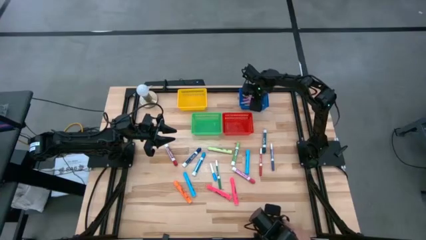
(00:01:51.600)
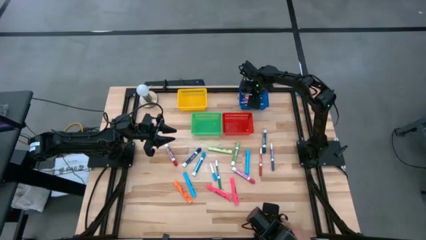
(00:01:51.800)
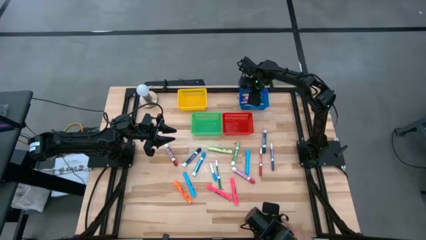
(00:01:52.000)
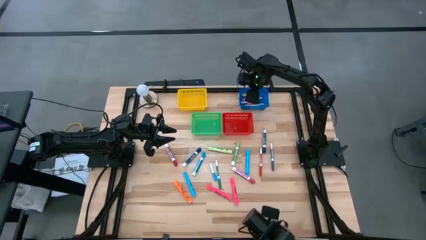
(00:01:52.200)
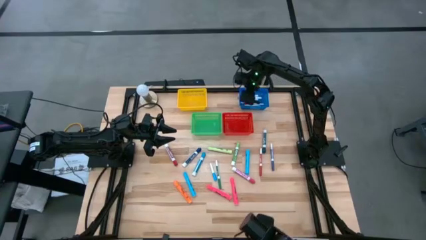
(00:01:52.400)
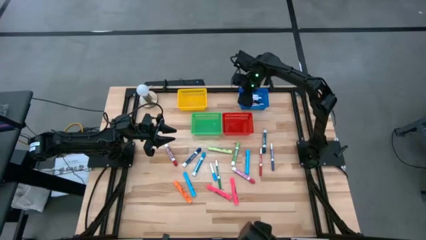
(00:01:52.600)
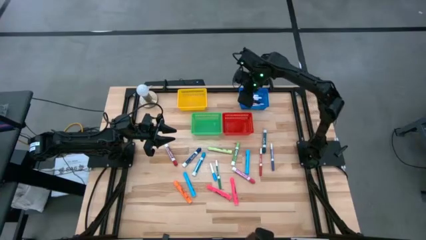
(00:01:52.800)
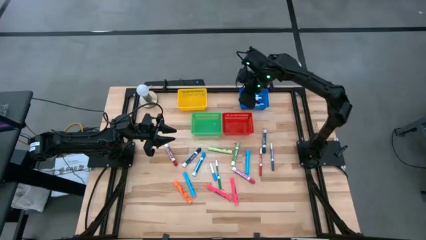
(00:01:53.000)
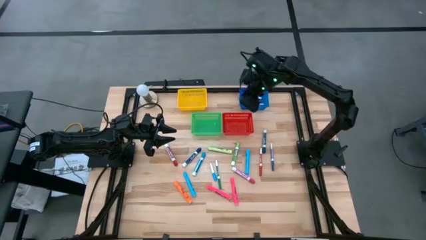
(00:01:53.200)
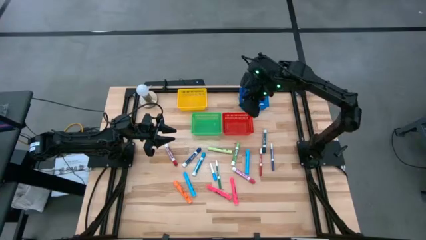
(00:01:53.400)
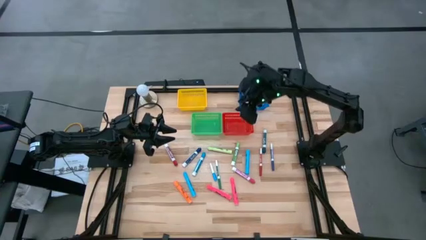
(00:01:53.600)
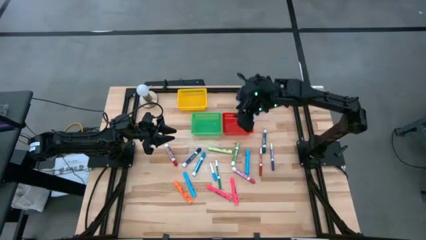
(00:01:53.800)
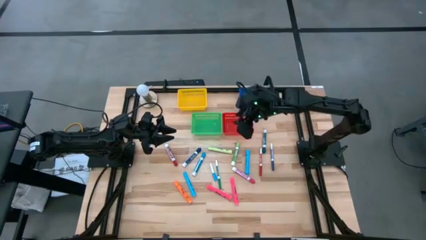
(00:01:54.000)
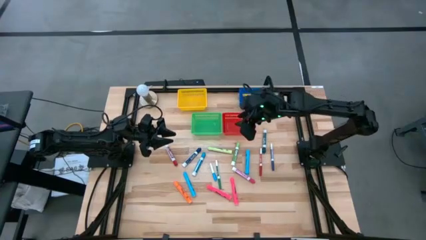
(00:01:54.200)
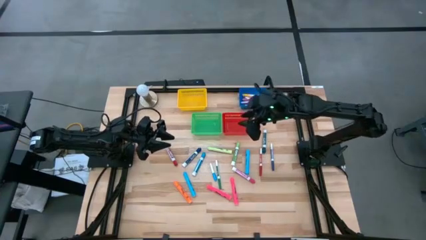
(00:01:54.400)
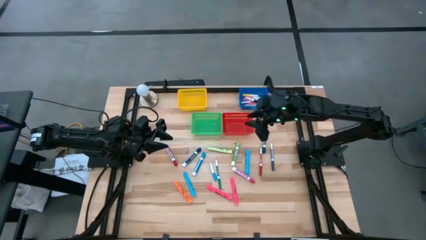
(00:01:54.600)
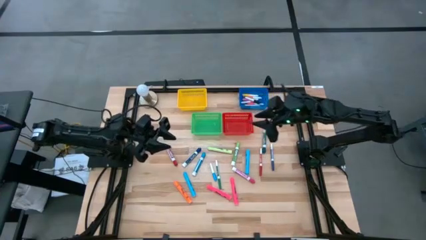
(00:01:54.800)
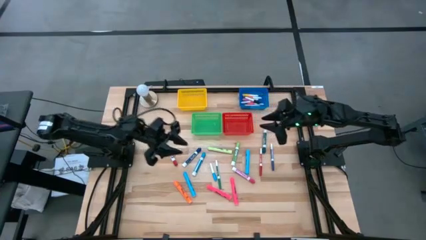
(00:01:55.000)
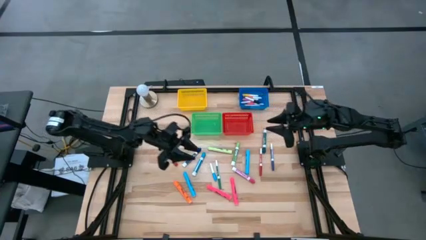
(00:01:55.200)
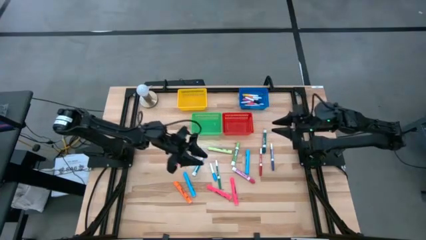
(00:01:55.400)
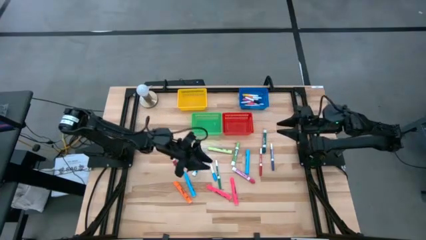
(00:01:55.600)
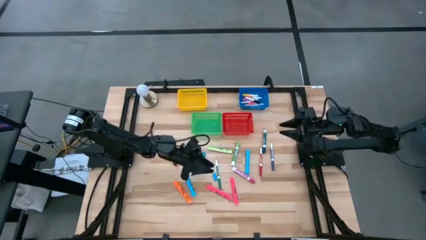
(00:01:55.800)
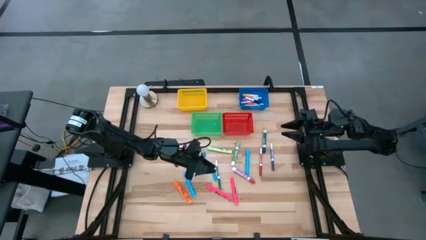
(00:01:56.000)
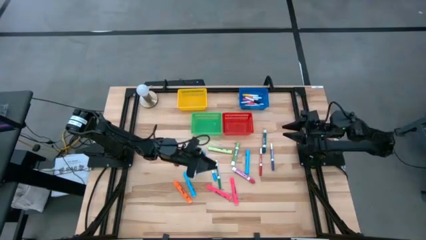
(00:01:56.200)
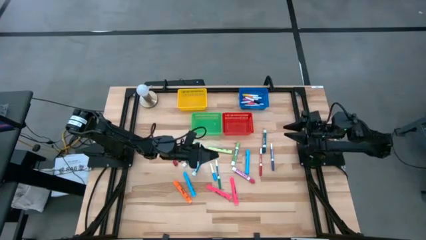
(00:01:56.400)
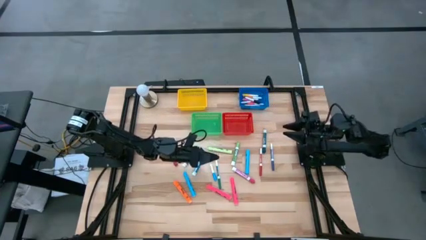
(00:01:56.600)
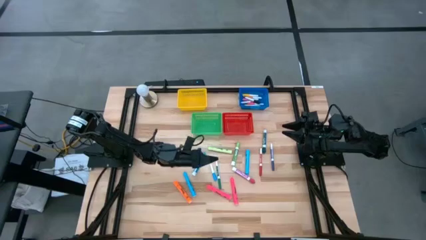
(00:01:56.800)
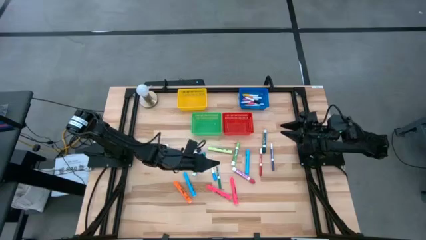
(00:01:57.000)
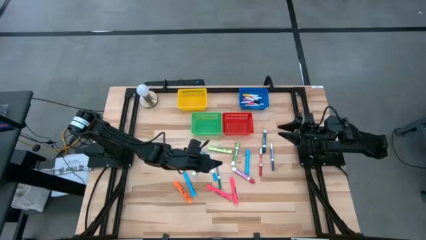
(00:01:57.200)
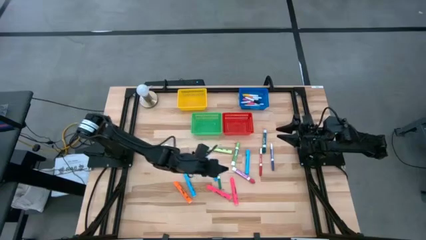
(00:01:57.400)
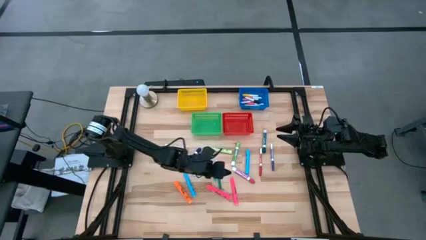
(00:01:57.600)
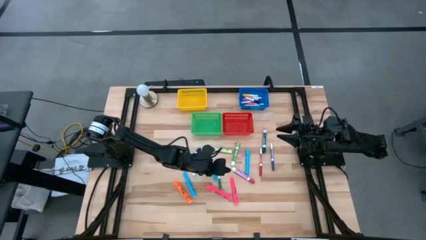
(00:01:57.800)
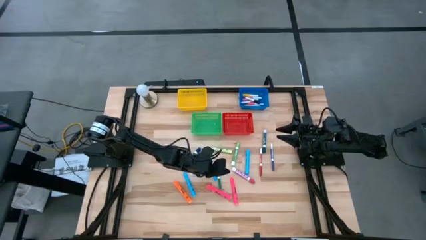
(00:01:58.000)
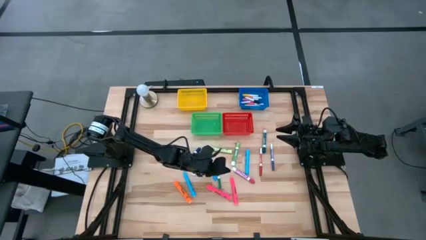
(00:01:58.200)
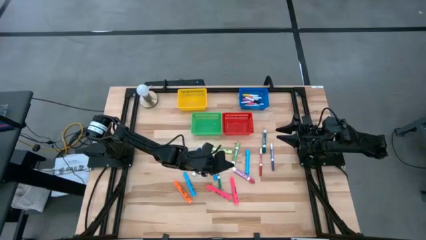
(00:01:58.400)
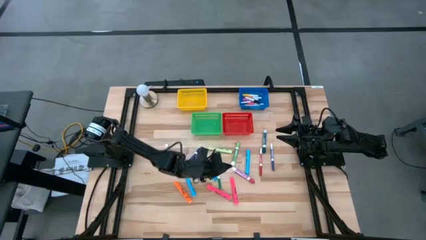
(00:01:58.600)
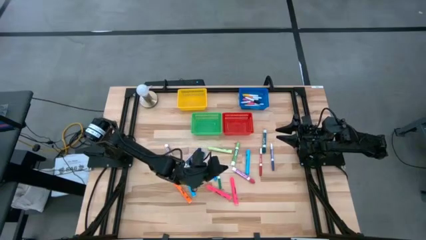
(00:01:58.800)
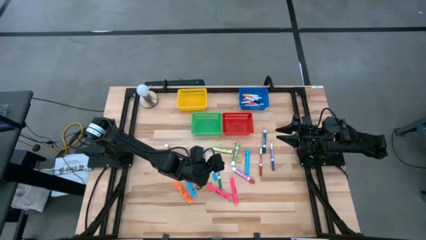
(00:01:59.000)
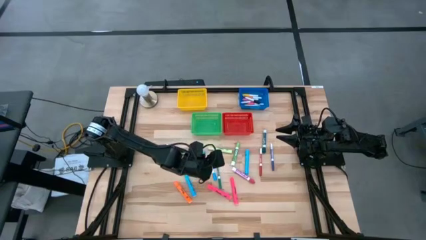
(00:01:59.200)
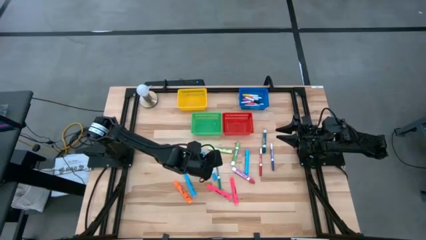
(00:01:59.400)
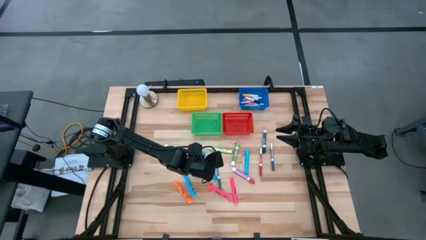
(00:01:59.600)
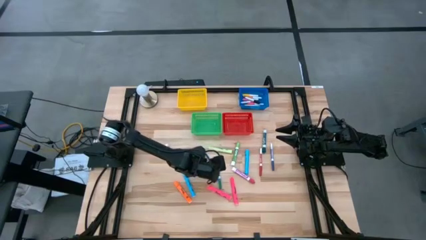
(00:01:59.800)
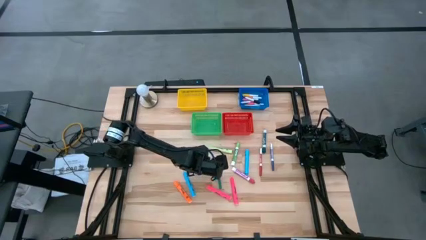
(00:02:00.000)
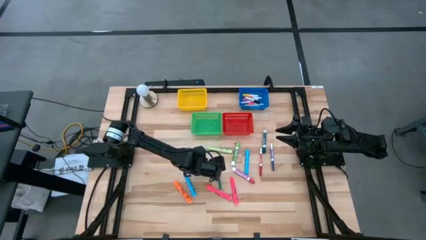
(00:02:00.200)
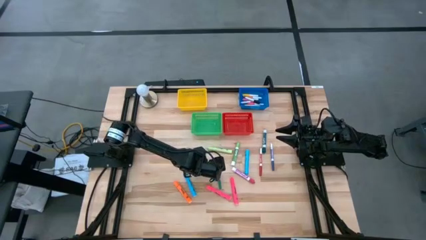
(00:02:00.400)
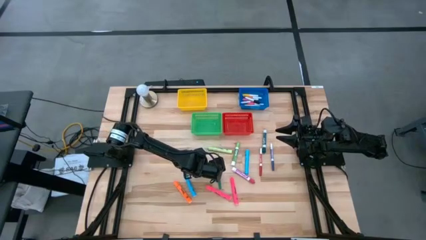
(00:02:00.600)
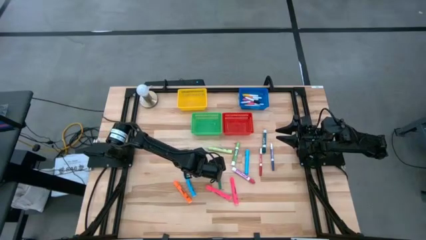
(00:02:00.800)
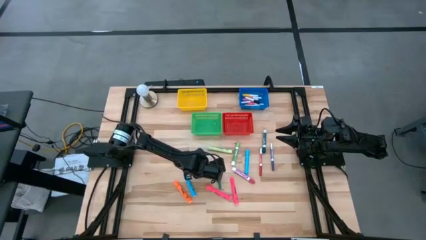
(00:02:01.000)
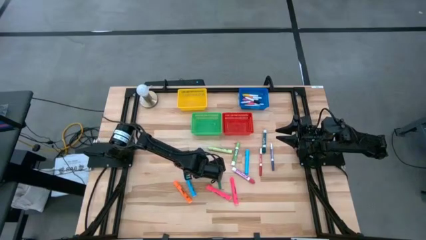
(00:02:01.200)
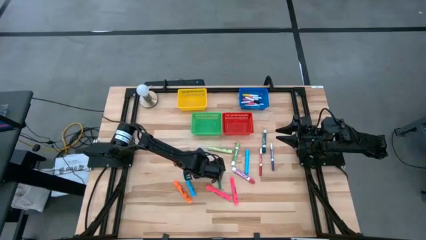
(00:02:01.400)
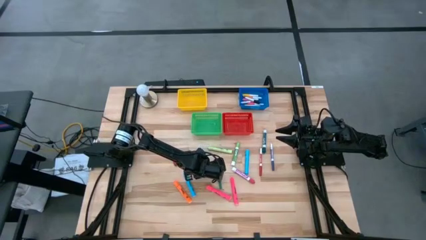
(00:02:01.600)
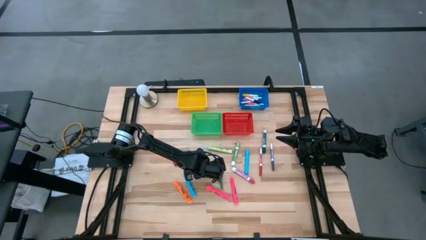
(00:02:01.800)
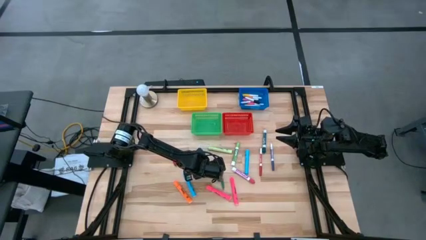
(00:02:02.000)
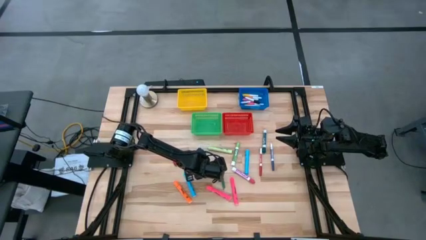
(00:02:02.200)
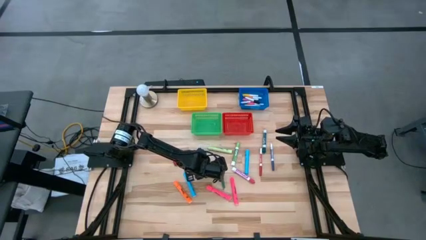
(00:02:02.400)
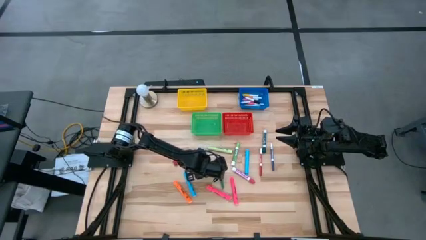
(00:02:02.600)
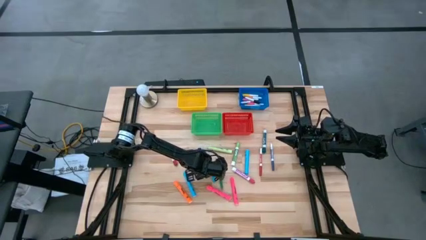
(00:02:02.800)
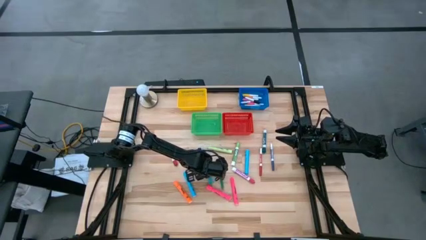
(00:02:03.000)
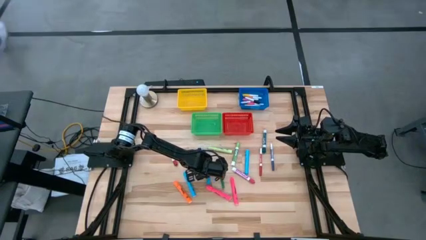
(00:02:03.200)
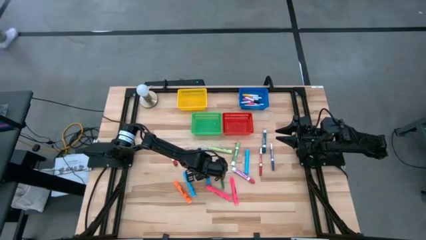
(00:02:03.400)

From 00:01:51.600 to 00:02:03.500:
Task: Pick & Place Markers
Put the blue highlighter into the blue bin
